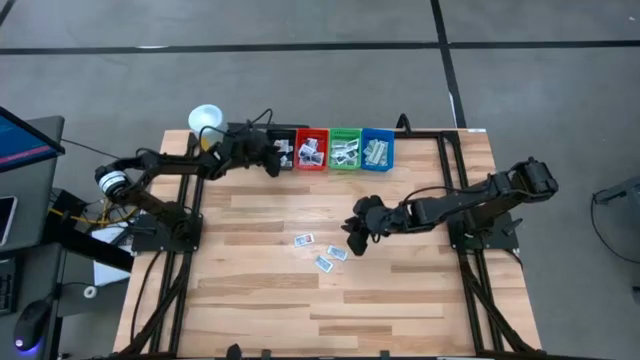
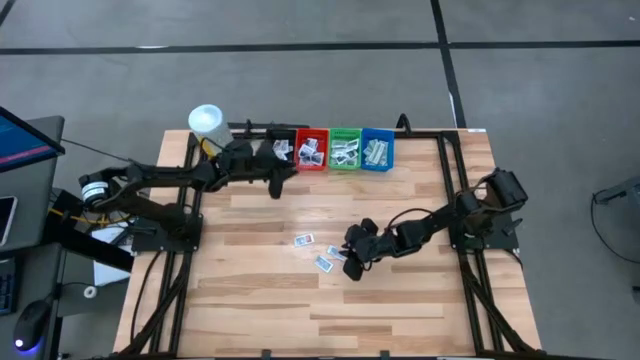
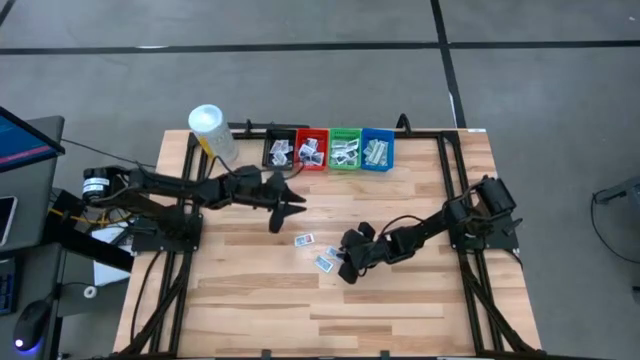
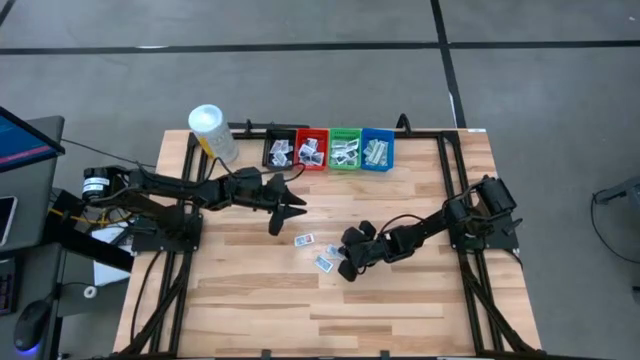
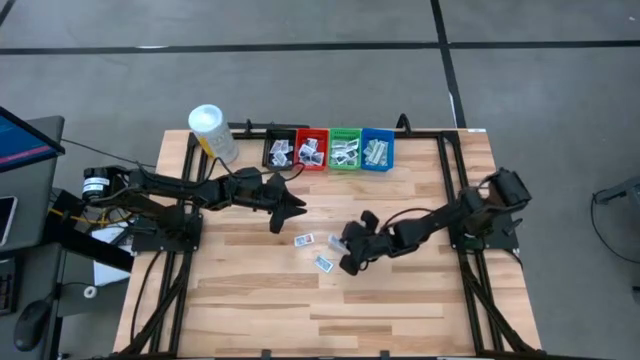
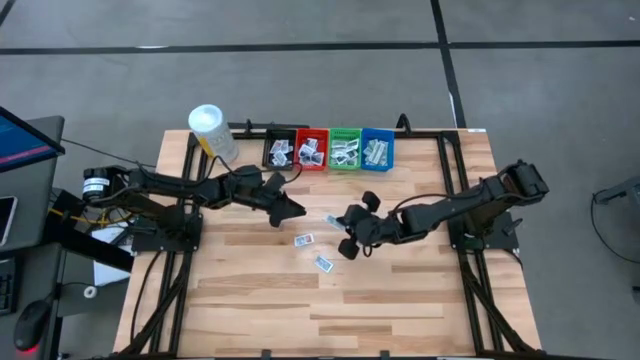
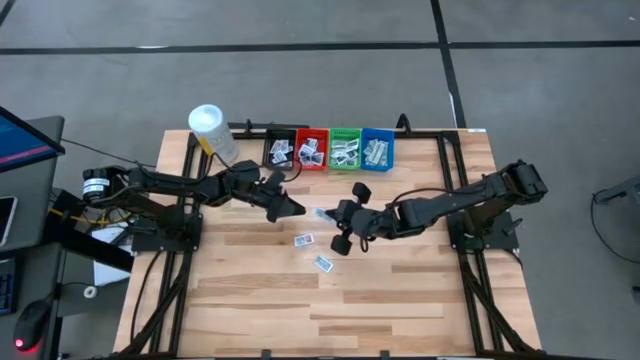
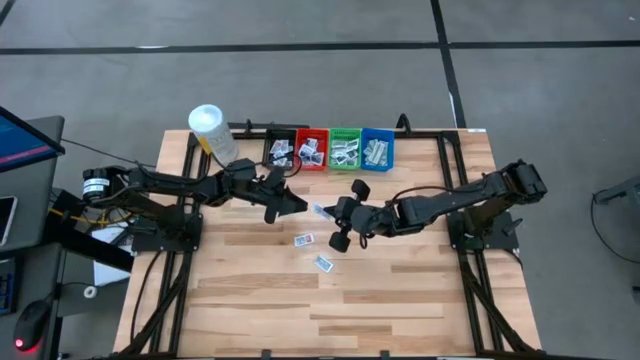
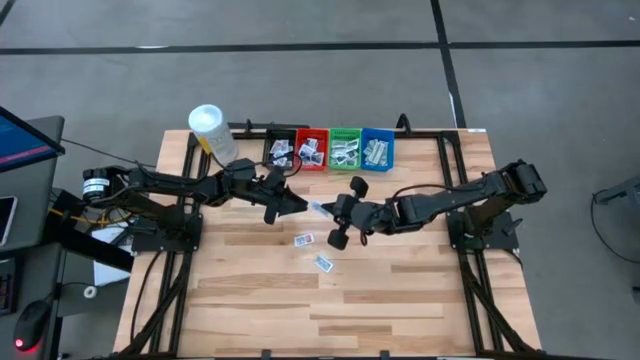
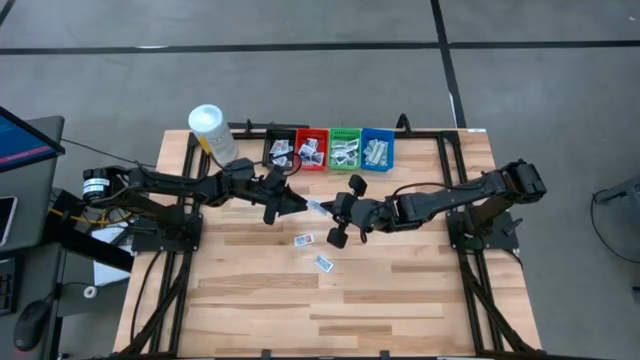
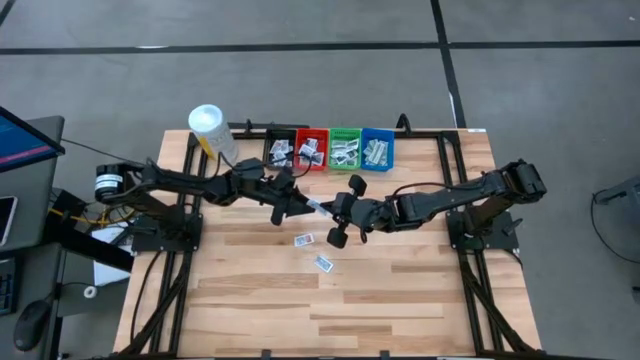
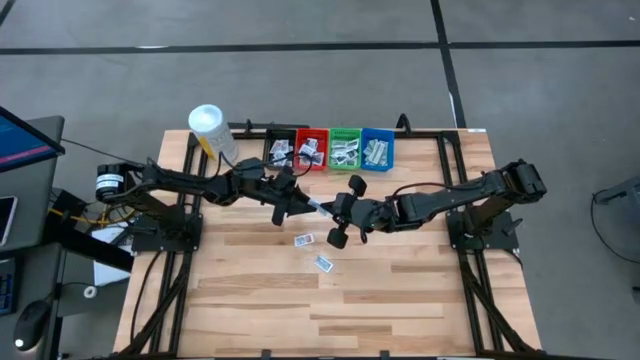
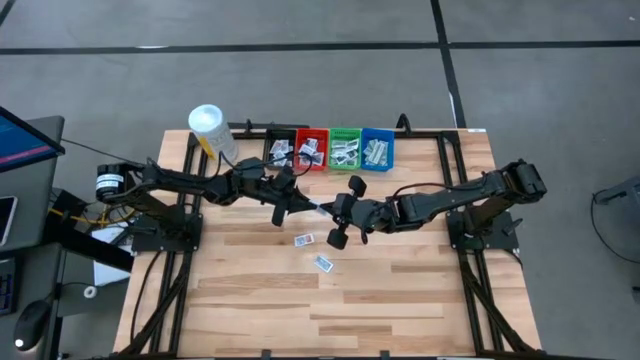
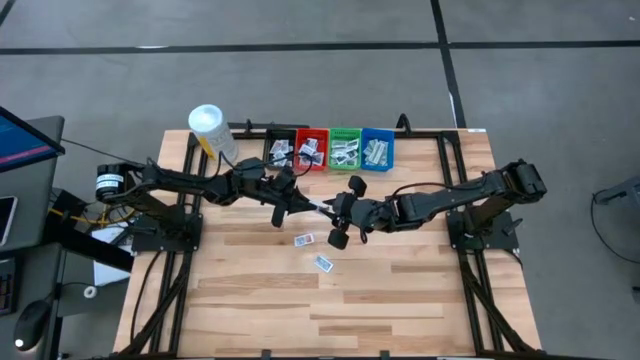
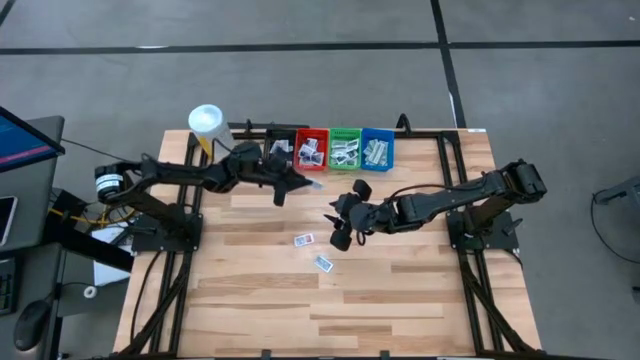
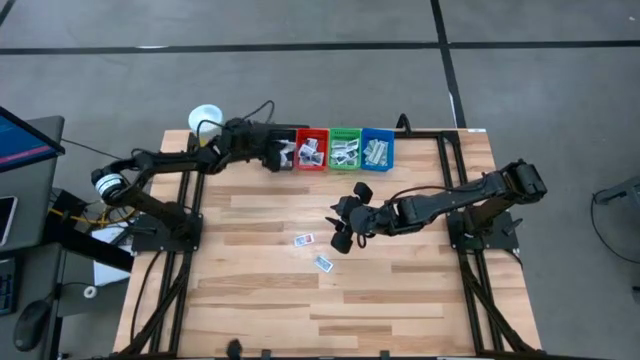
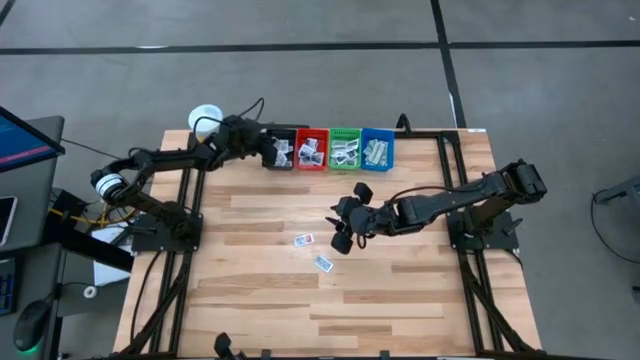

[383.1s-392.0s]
Task: Pick & Place First Aid Supplies
Put the right ointment pack into the black bin

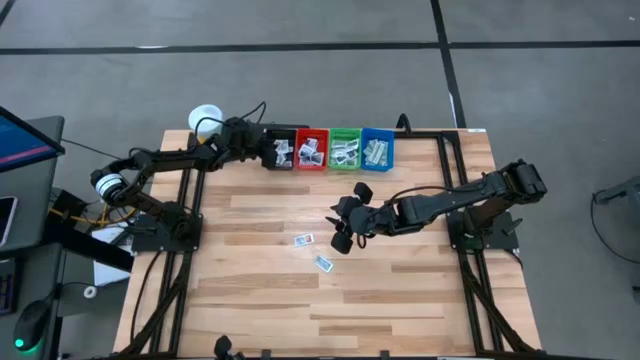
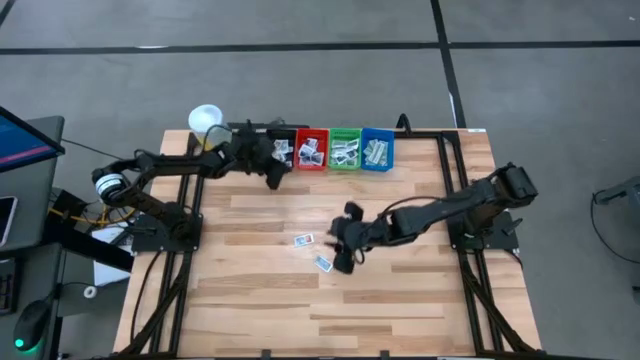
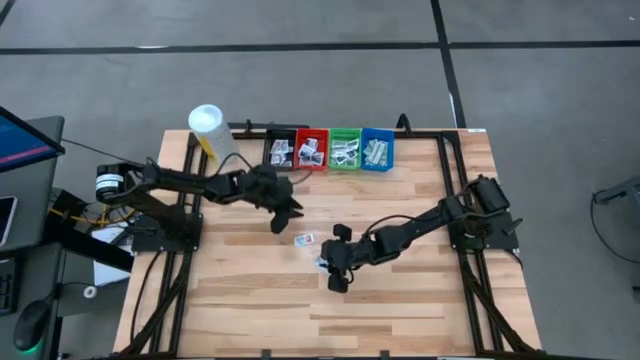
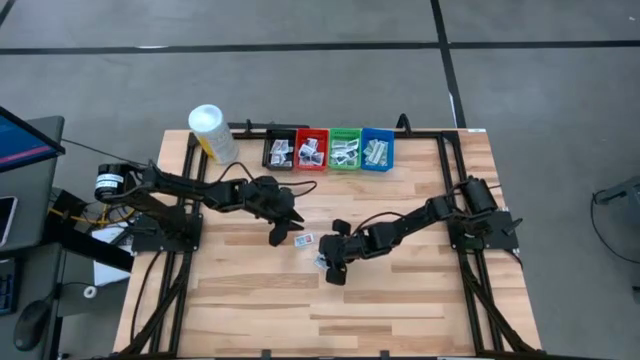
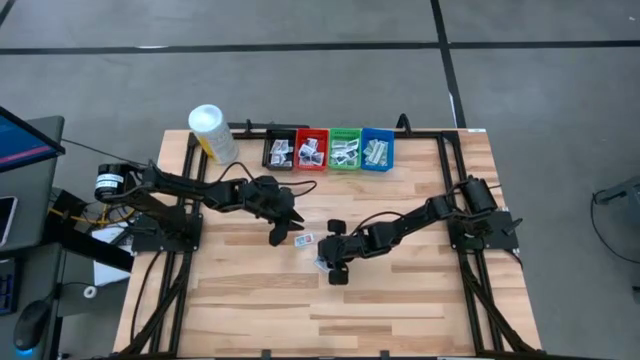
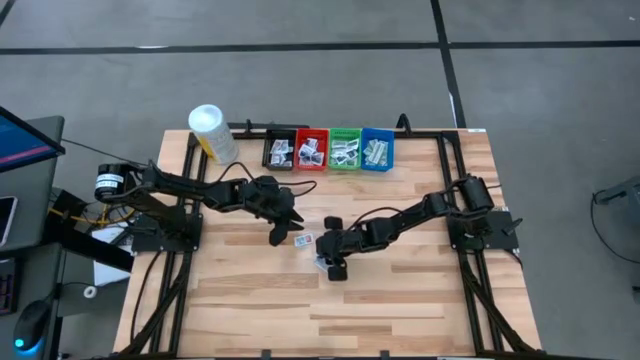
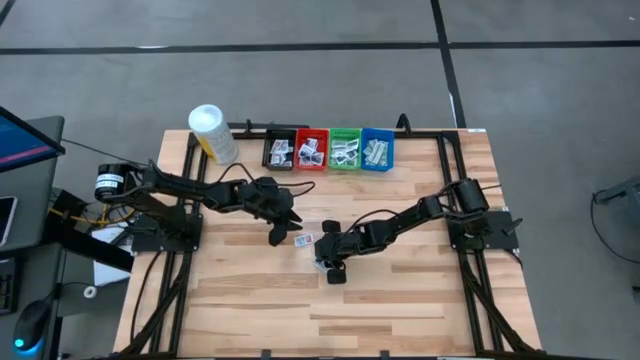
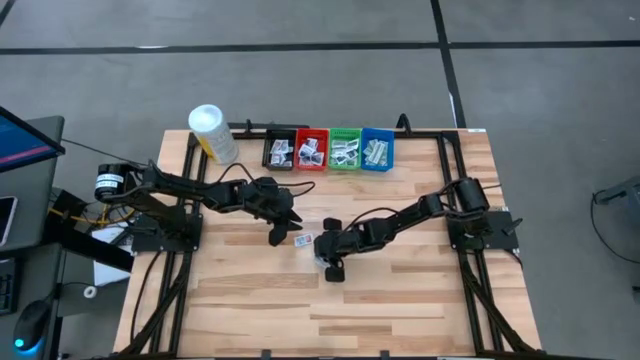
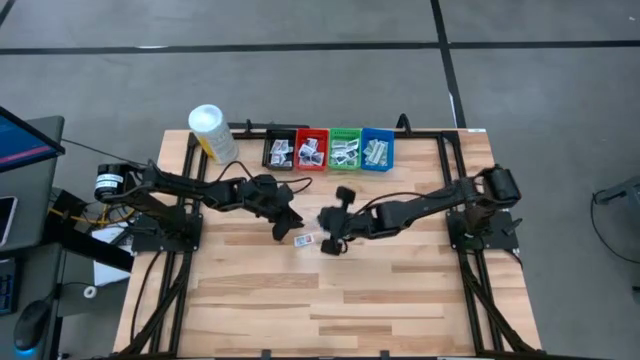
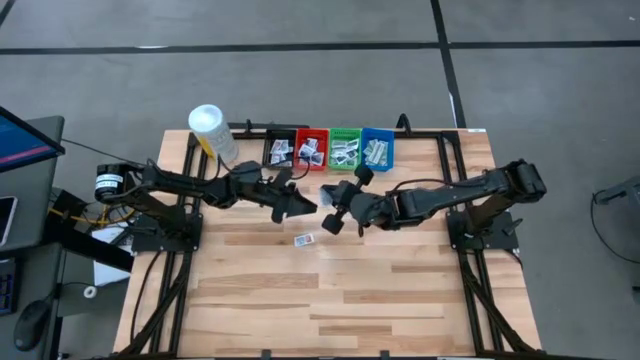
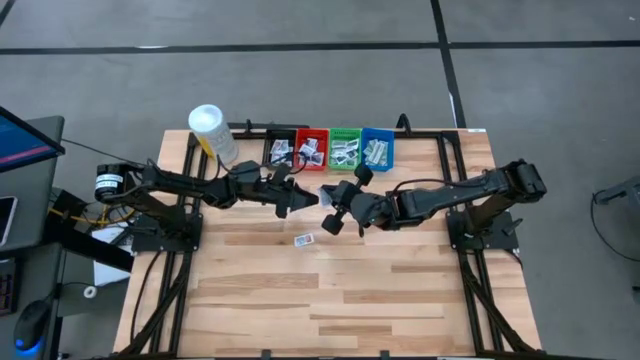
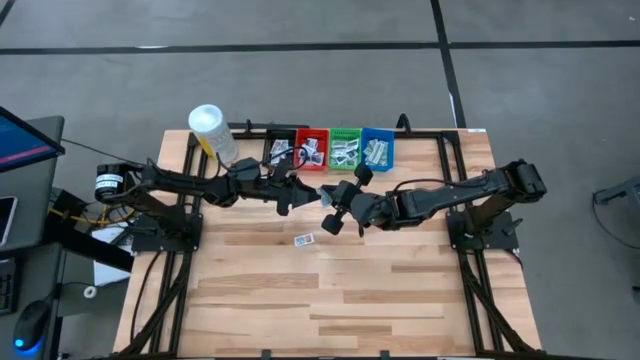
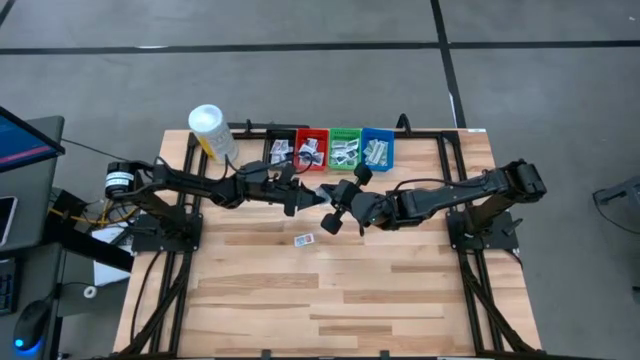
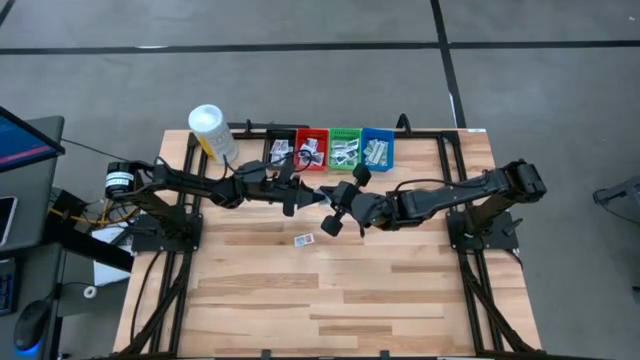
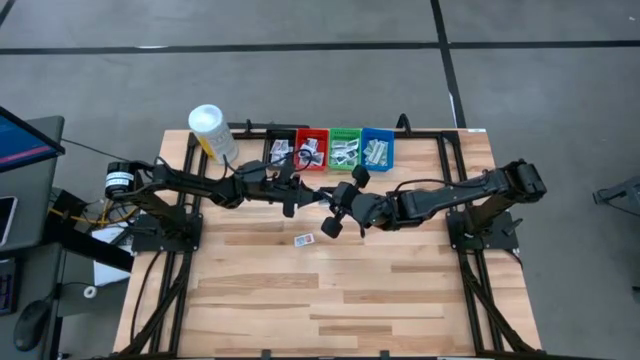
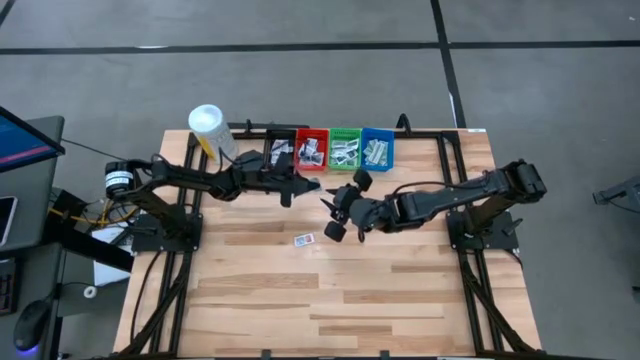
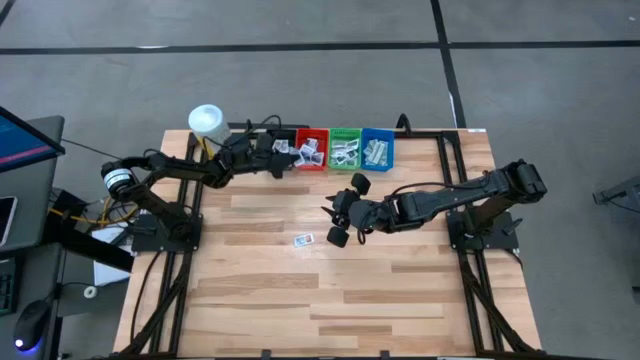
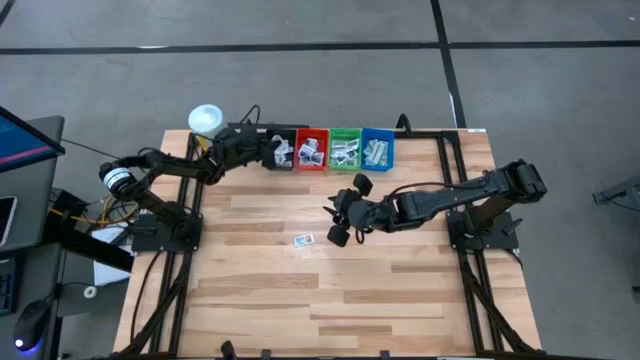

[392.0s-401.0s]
Put the bottom ointment pack into the black bin

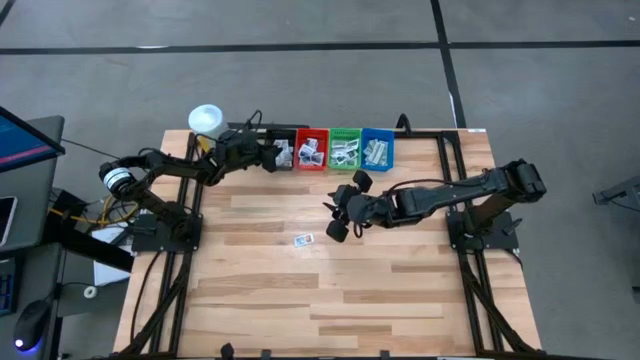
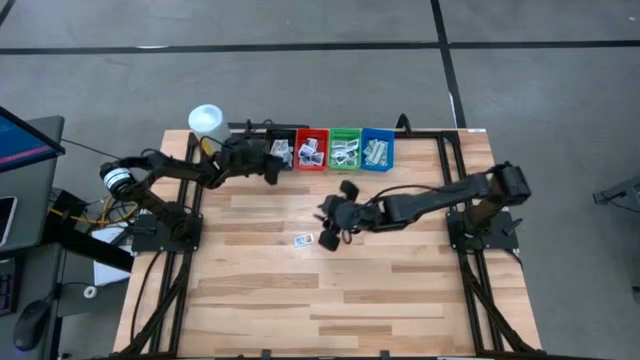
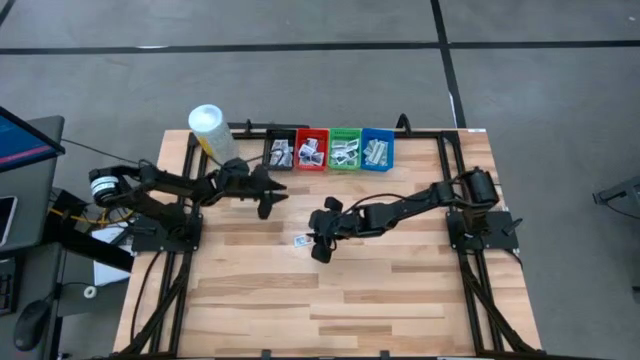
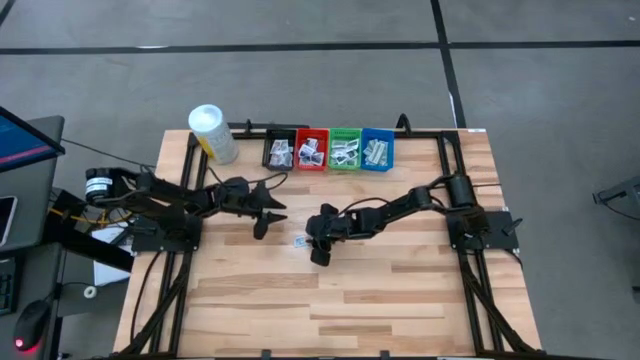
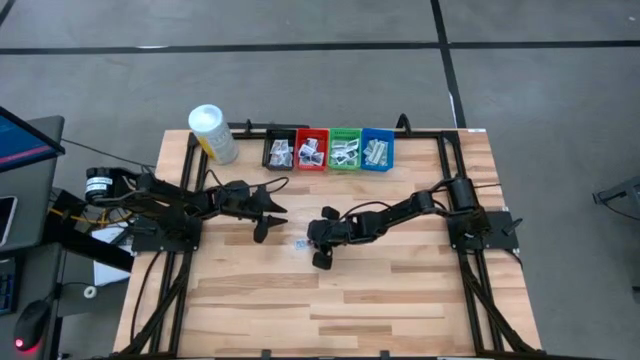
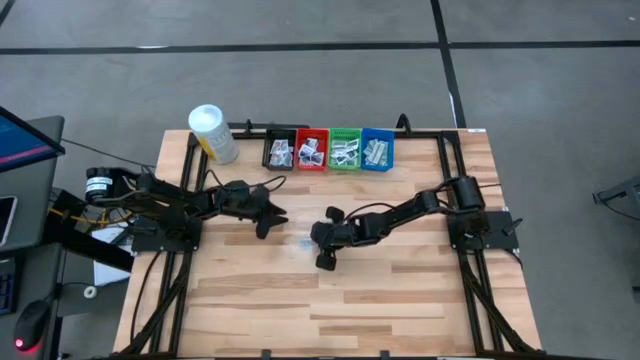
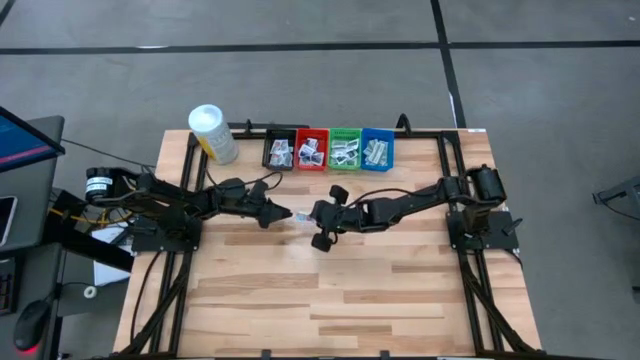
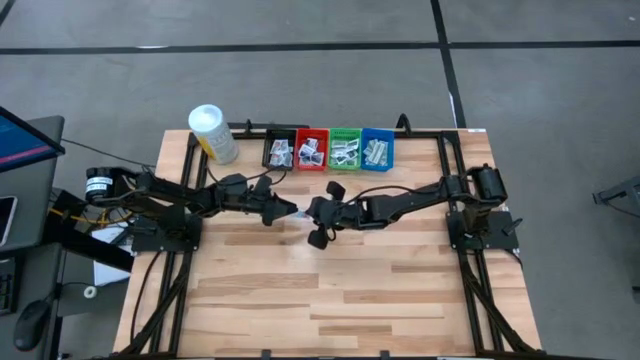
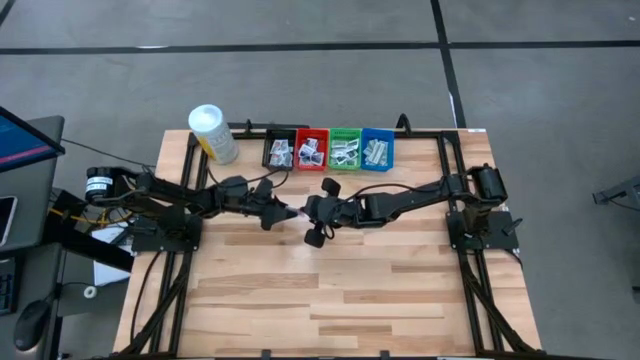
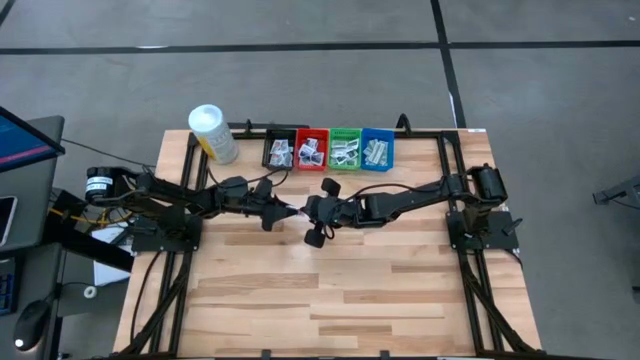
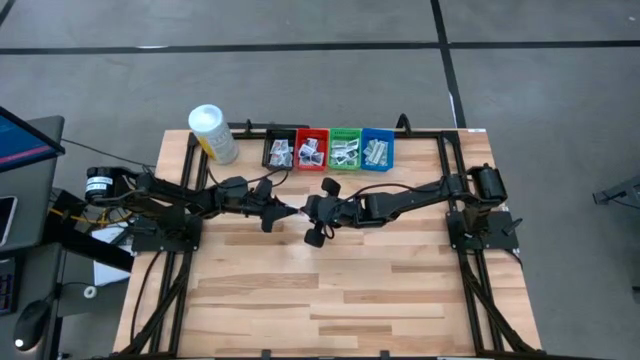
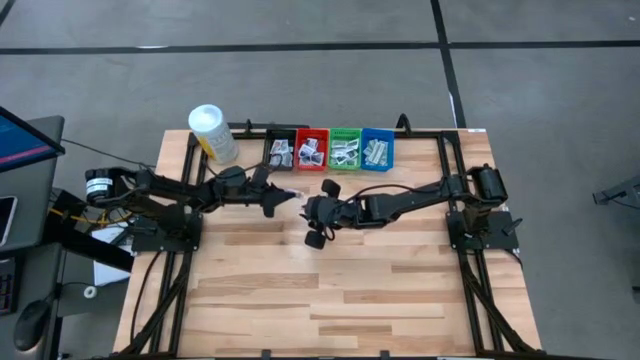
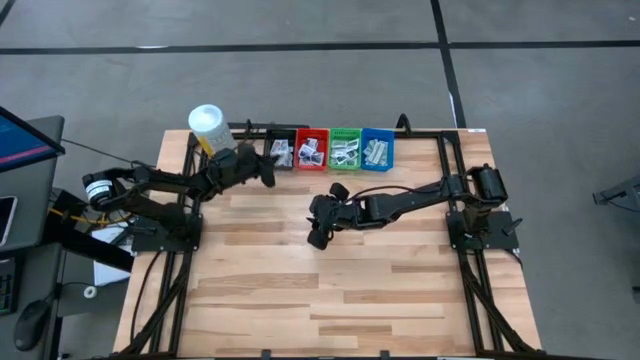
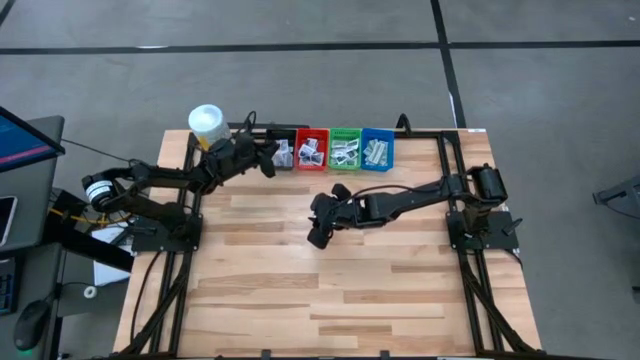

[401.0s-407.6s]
Put the ointment pack into the black bin
